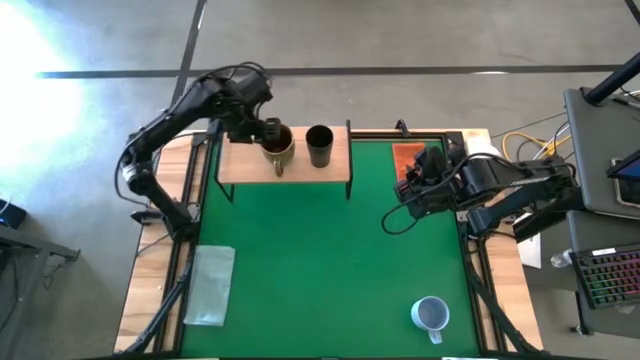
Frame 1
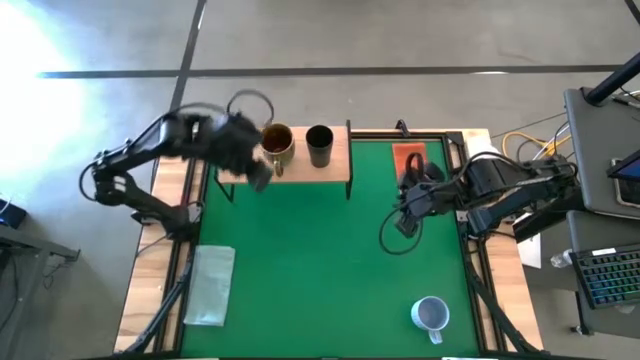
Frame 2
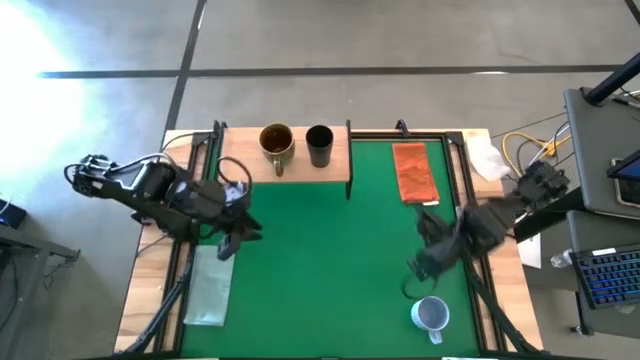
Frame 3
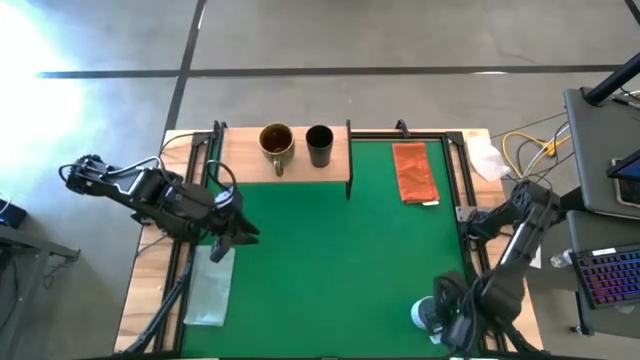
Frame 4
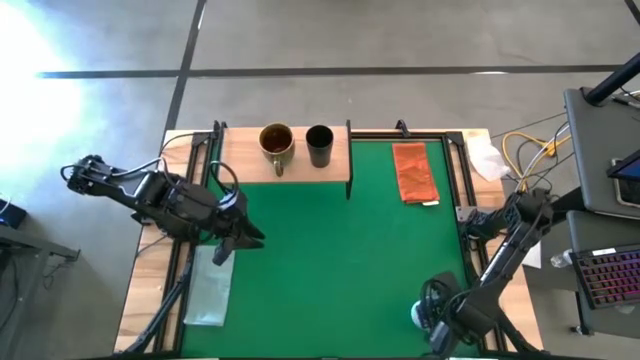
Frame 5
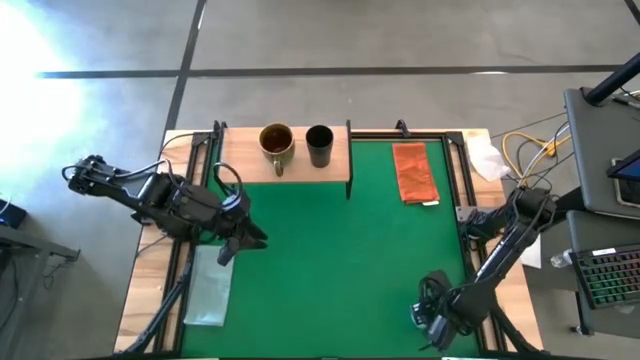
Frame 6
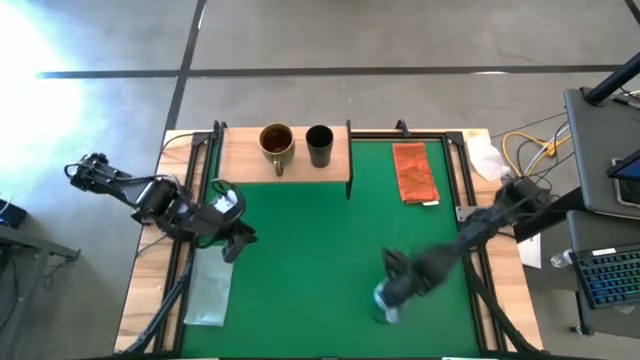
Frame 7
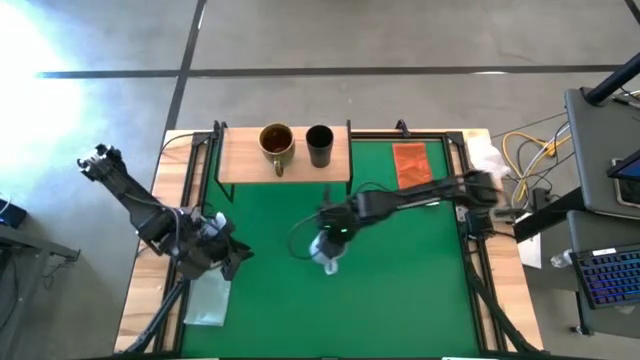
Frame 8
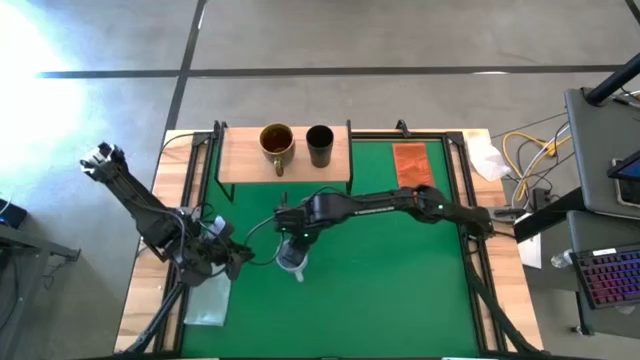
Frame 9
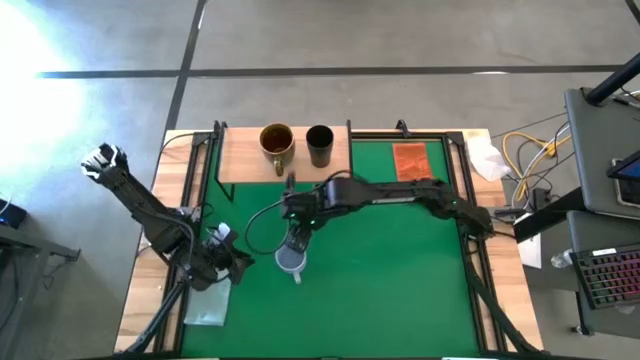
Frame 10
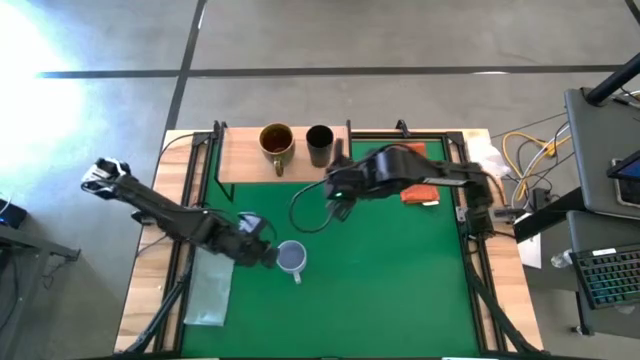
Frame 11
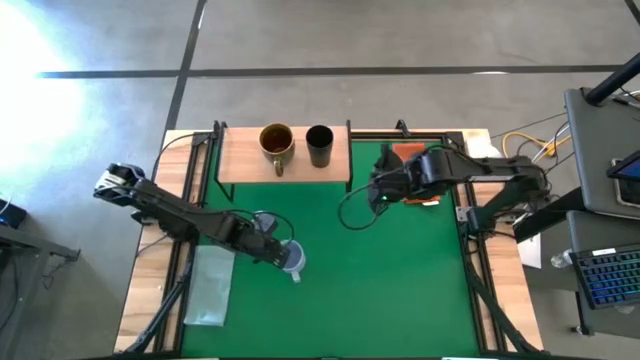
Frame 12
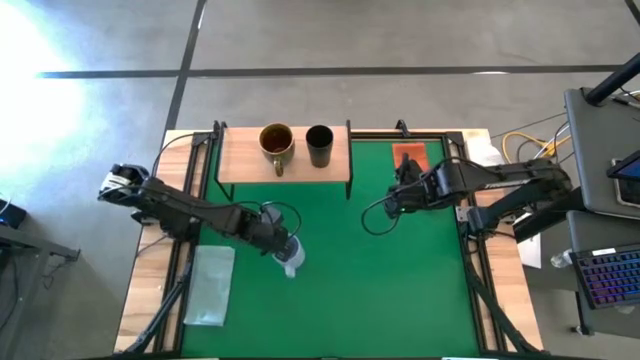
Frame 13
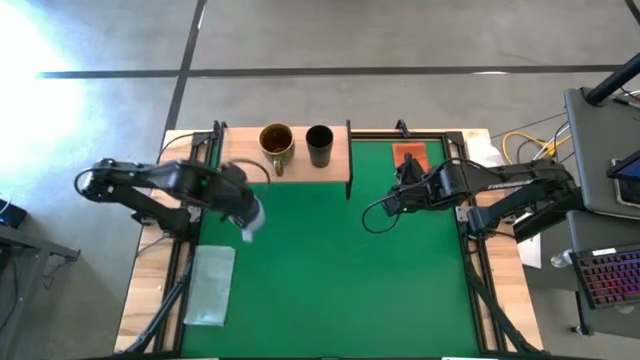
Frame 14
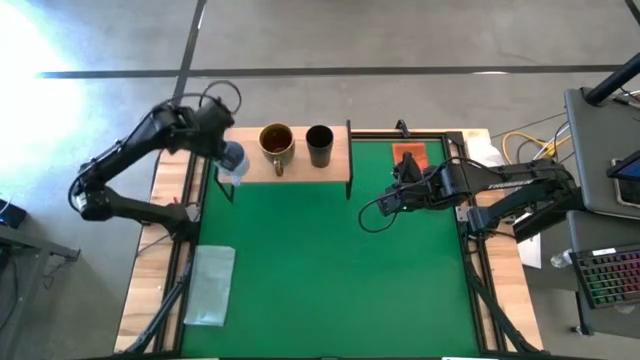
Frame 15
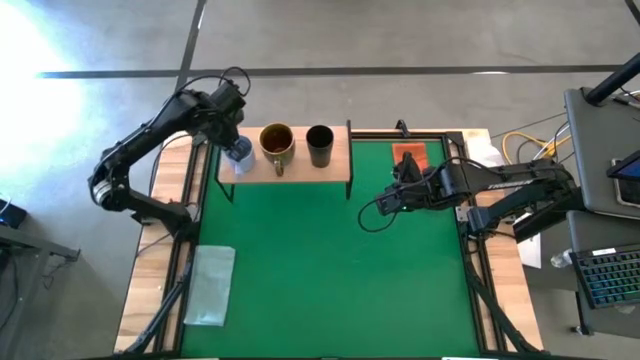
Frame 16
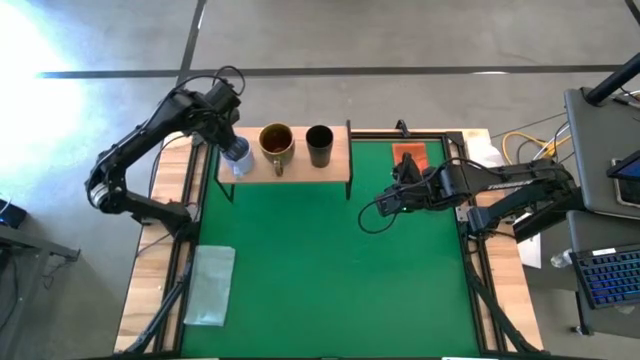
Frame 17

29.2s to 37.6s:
Task: Stack small to large cups/mugs on shelf
Put the blue mug on the shelf

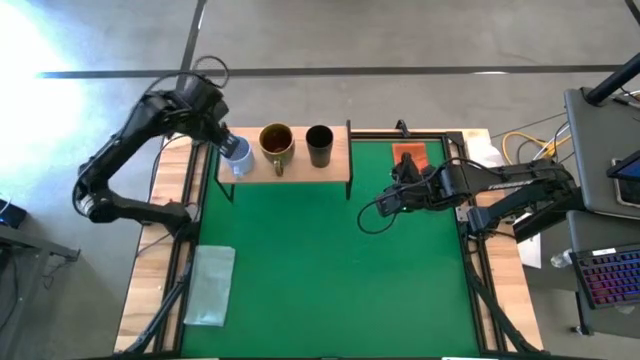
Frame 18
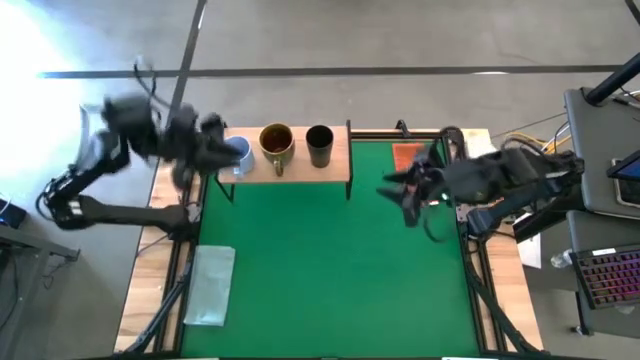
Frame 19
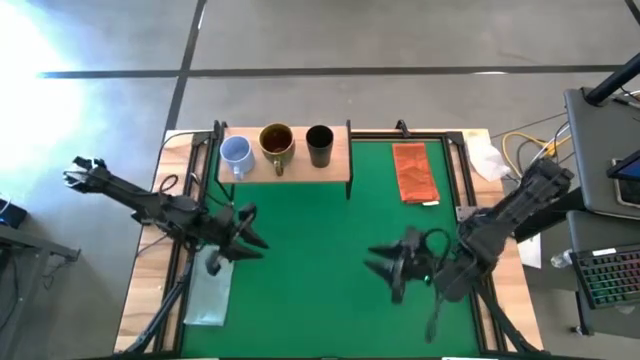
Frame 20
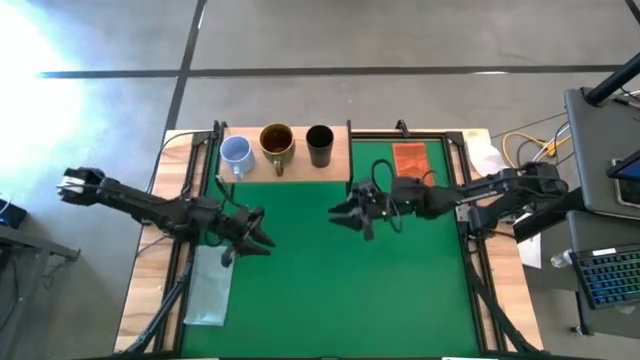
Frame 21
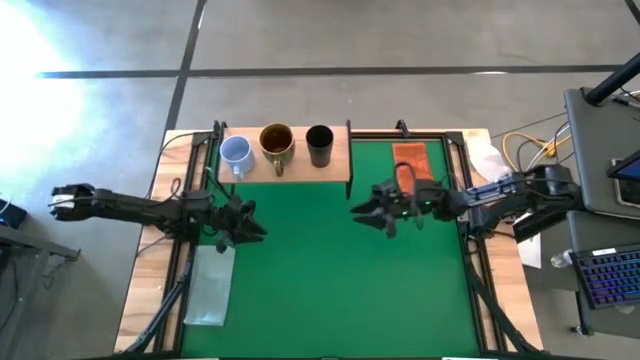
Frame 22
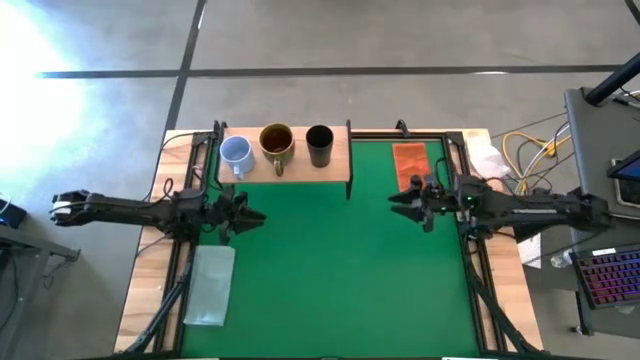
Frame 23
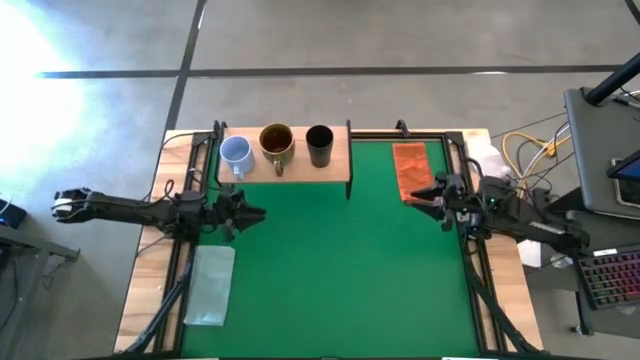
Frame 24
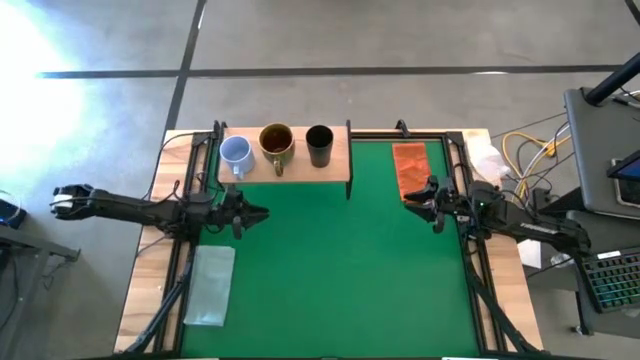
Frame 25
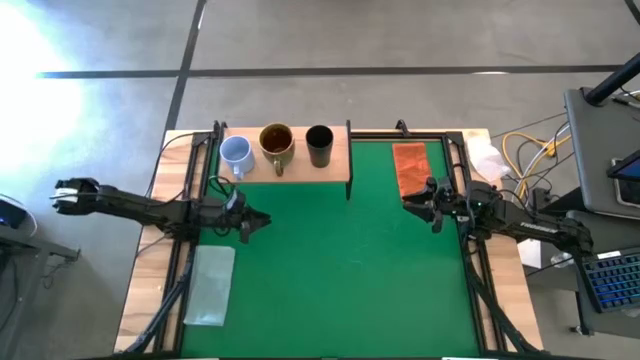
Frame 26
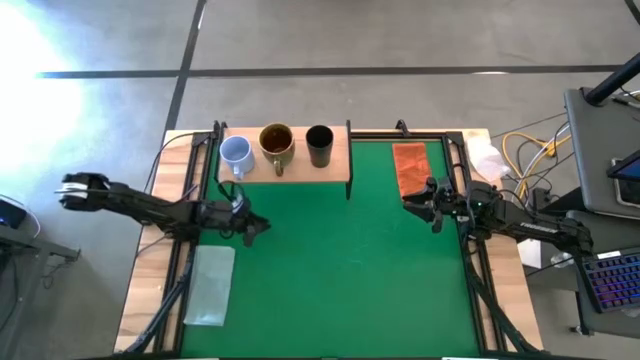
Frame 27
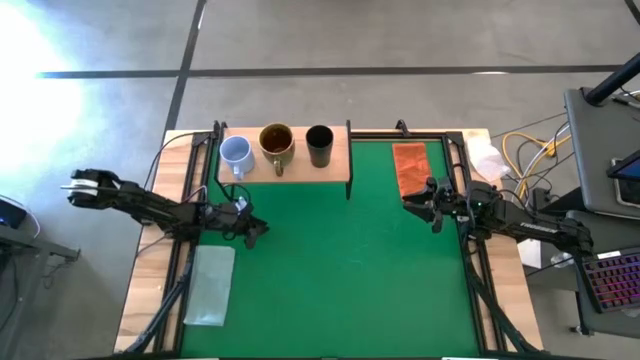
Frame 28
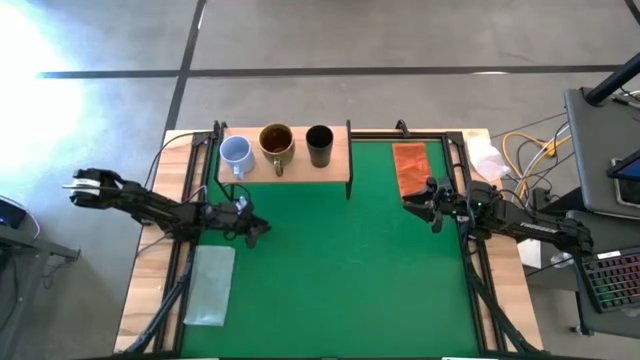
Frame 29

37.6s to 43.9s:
Return to Home Position

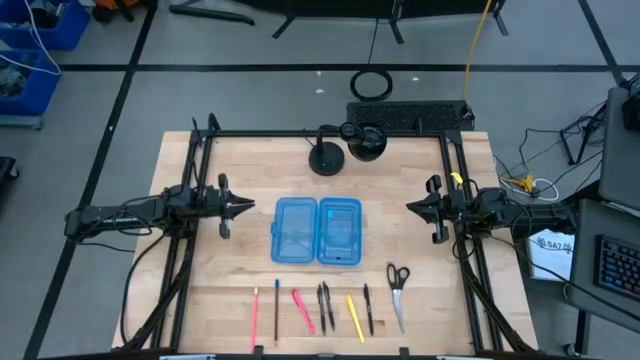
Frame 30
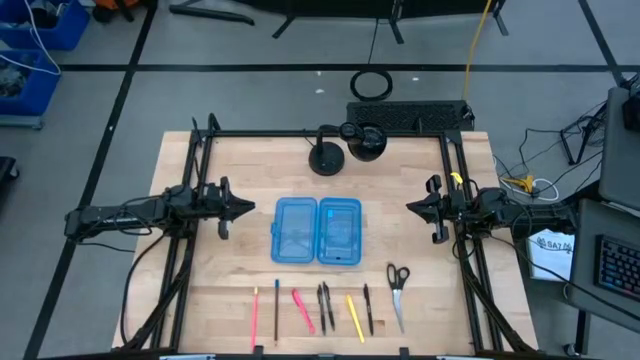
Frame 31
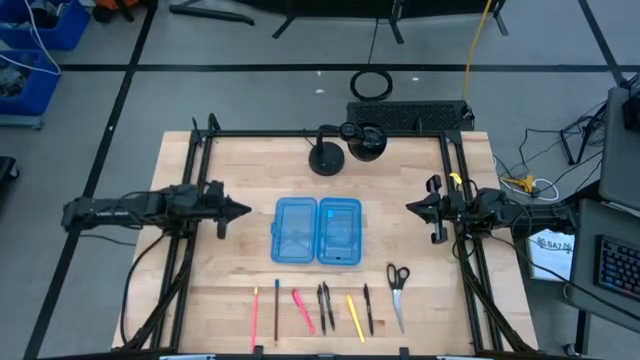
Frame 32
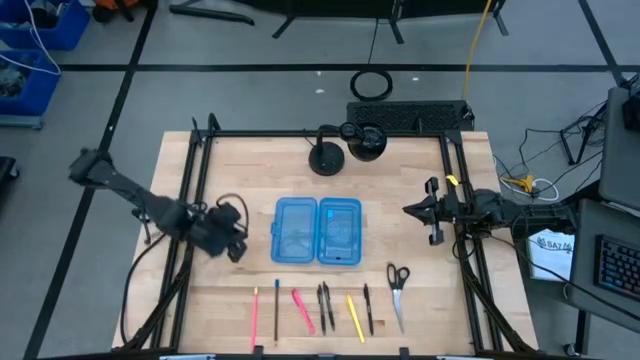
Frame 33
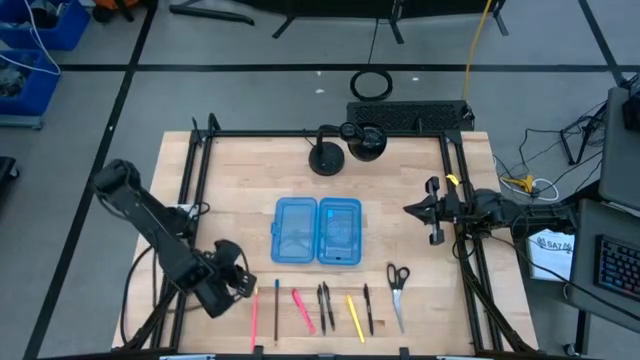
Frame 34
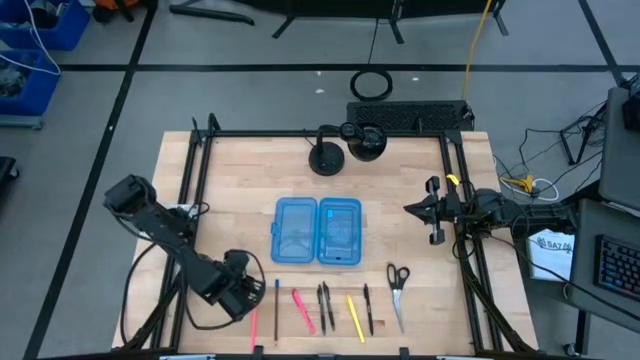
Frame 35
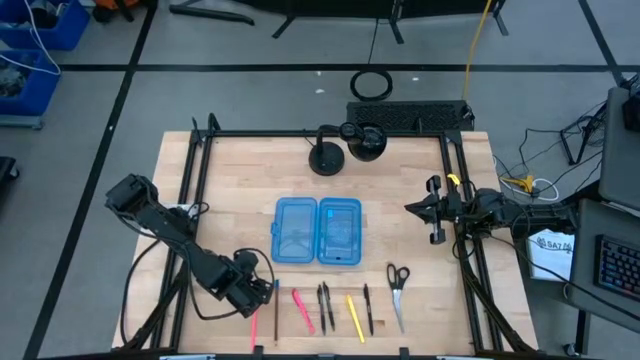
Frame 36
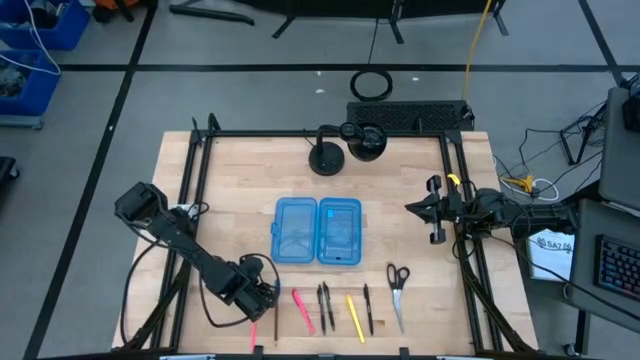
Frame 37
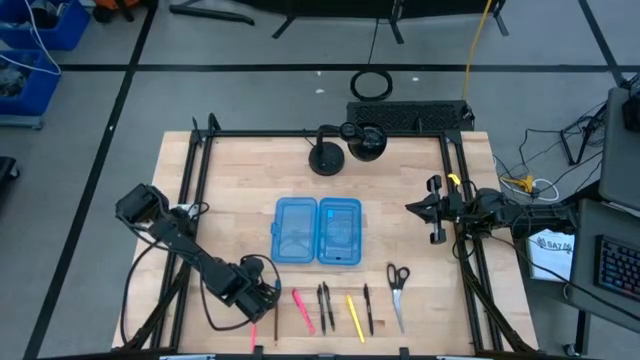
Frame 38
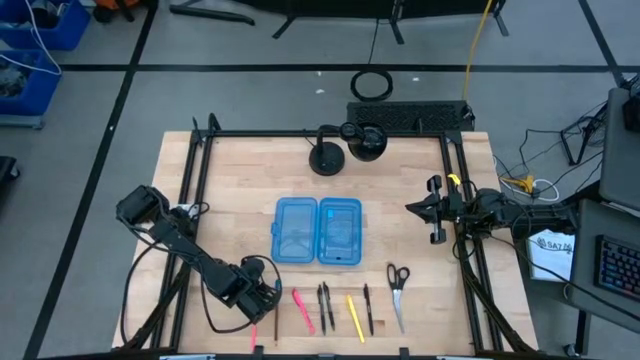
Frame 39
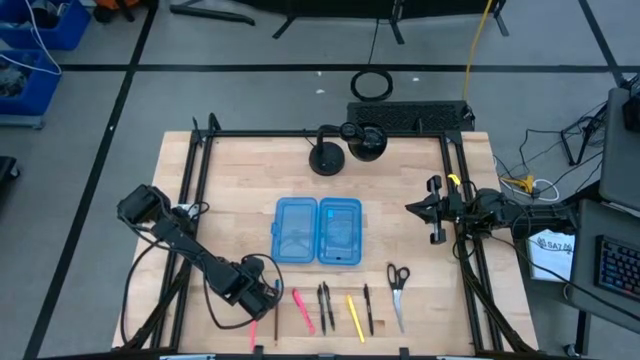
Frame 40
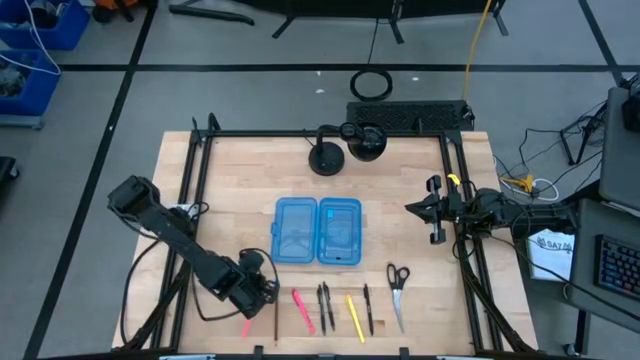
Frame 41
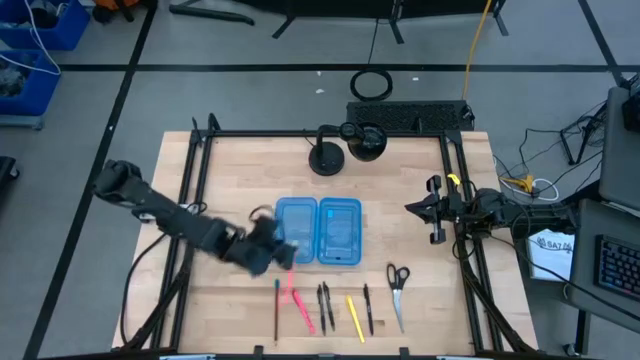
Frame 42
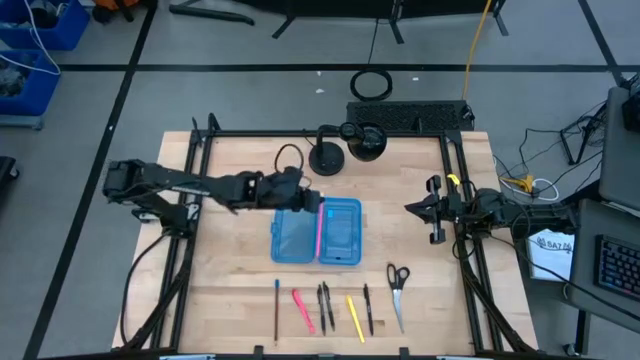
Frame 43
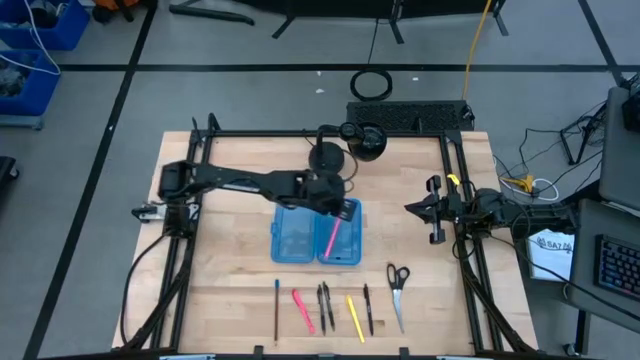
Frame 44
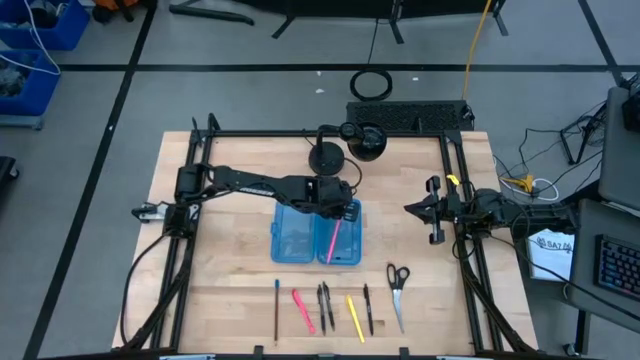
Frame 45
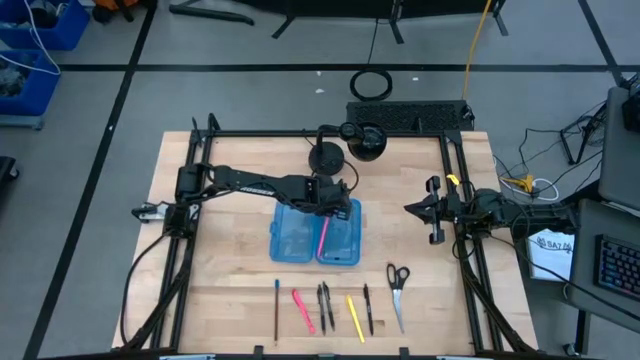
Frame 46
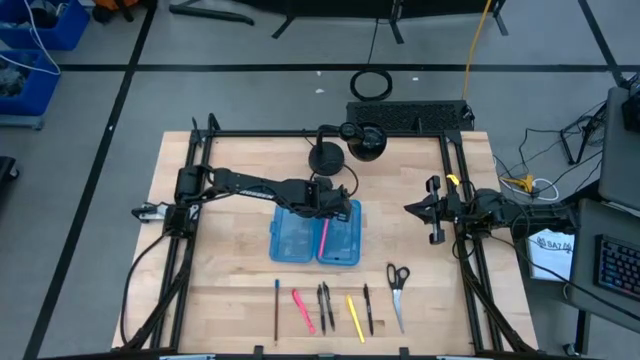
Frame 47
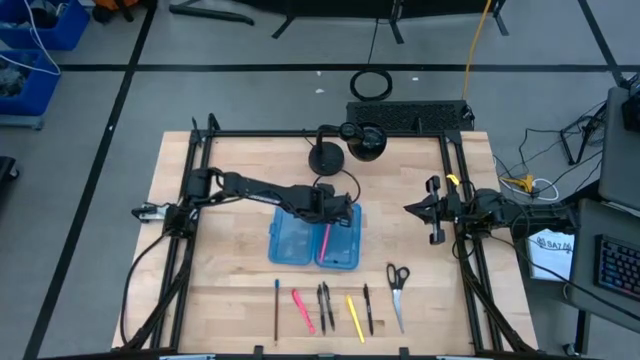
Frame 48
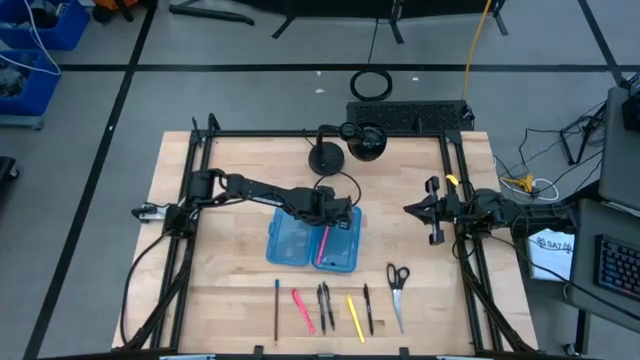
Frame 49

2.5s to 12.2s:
Task: Pick & place school supplies into a supply box
Put the pink pencil into the blue supply box
